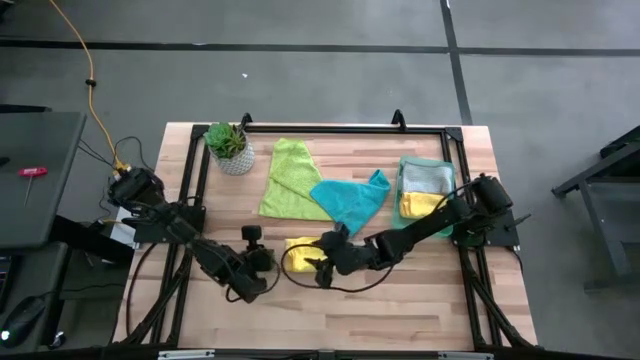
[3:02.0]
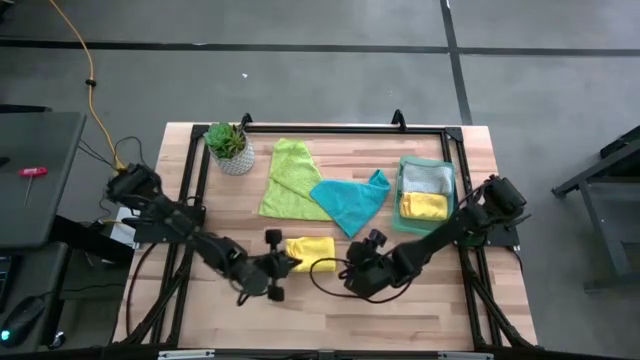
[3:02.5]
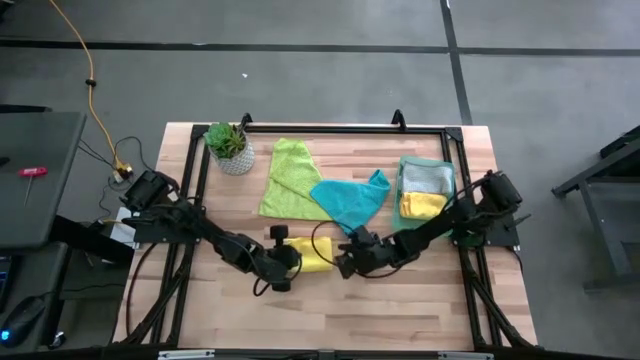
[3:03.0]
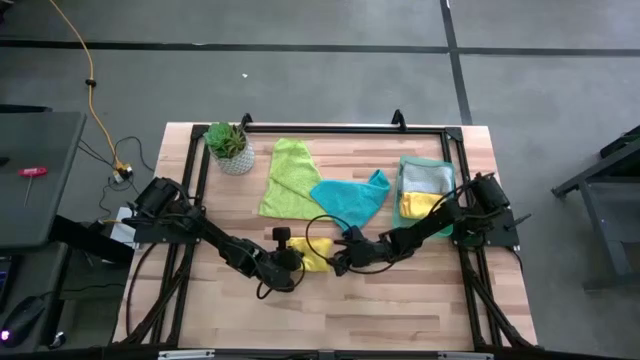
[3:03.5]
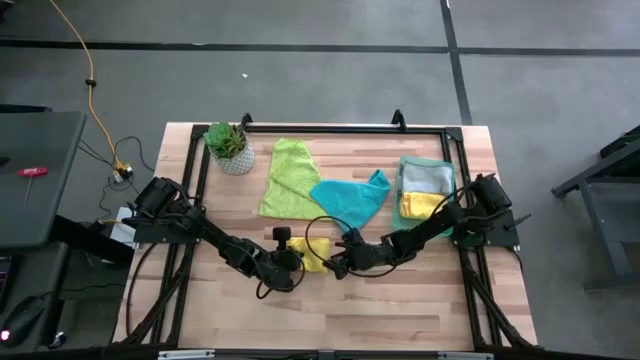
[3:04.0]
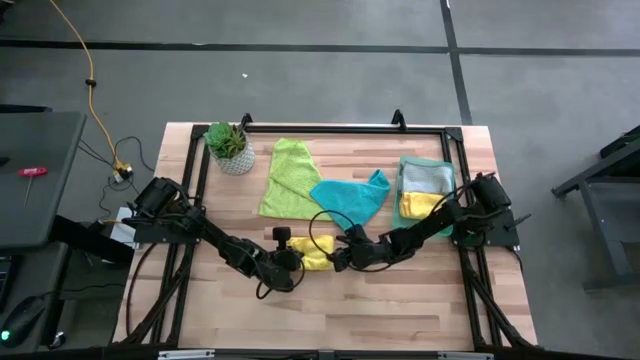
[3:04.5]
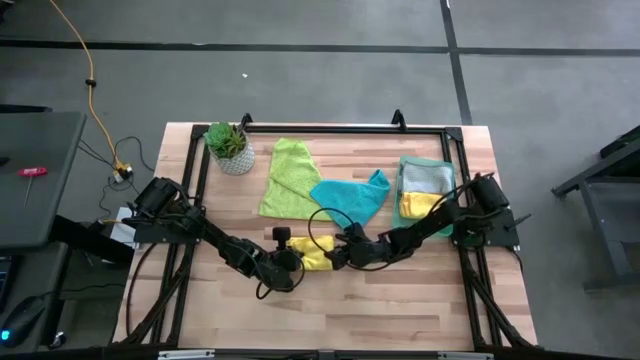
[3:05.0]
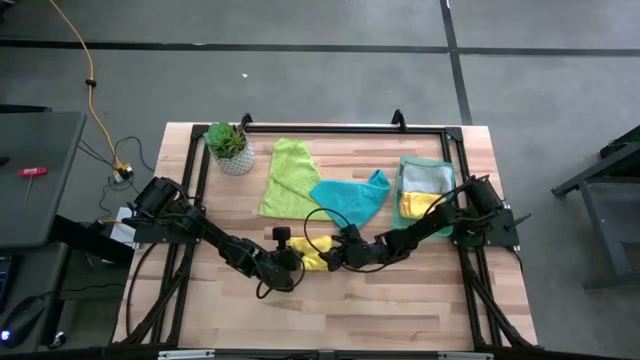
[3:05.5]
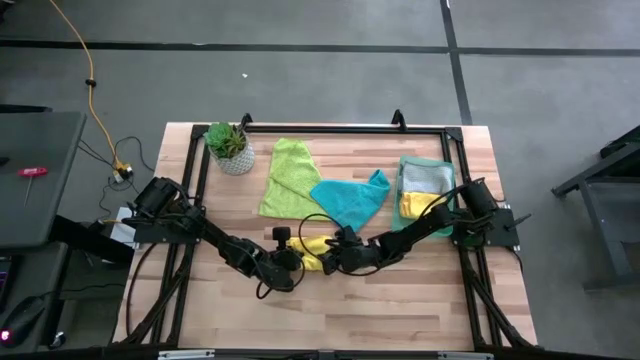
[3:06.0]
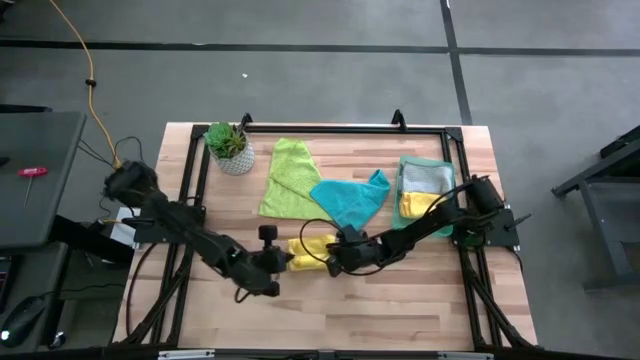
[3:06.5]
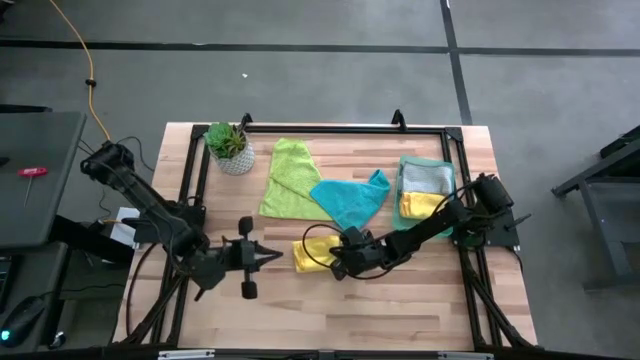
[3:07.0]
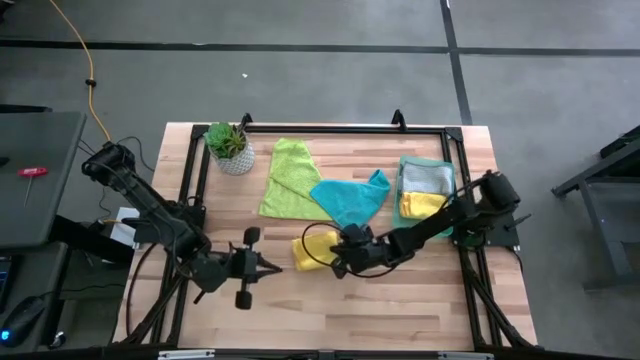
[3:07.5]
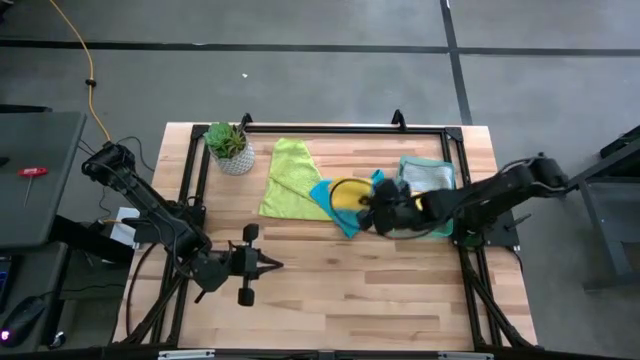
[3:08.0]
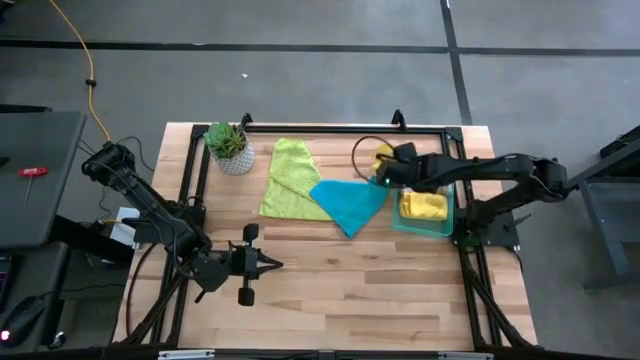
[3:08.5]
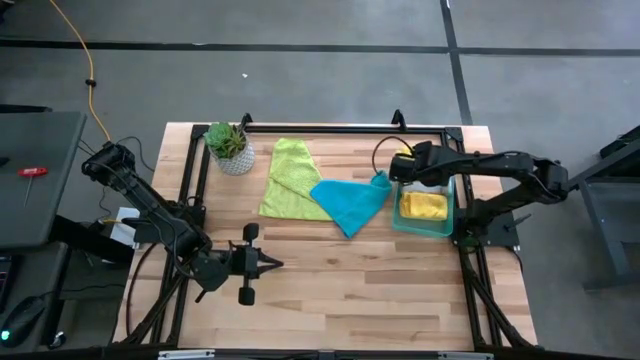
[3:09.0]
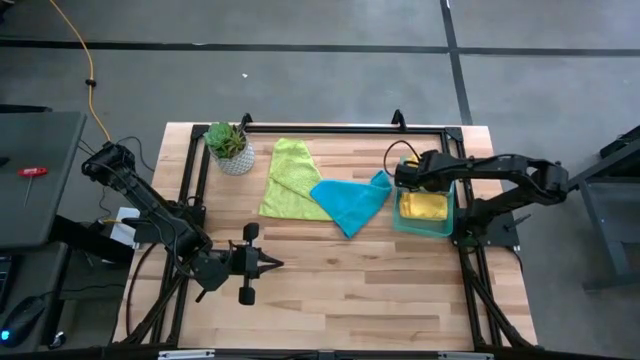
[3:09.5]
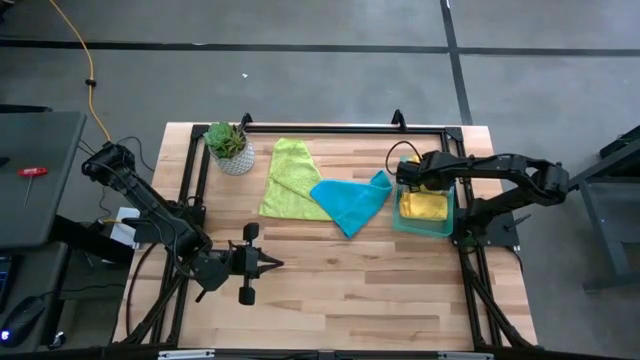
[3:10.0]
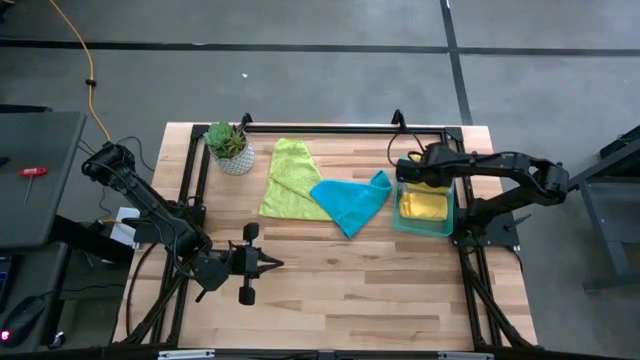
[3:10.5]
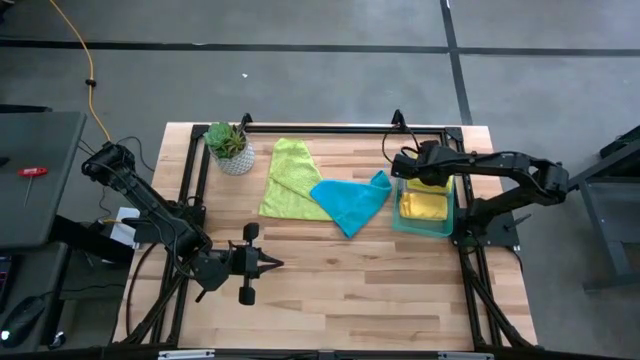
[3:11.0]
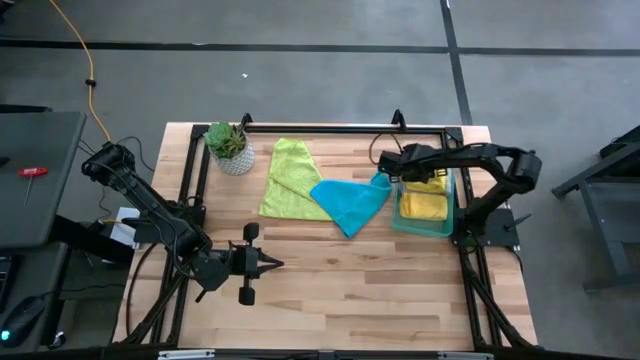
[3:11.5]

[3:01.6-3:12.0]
Task: Fold microfiber towels
Put the yellow microfiber cloth into the blue bin

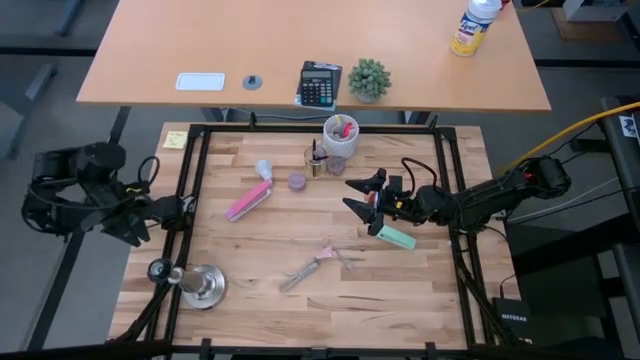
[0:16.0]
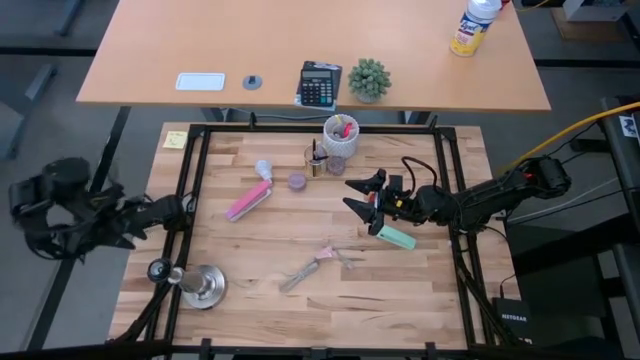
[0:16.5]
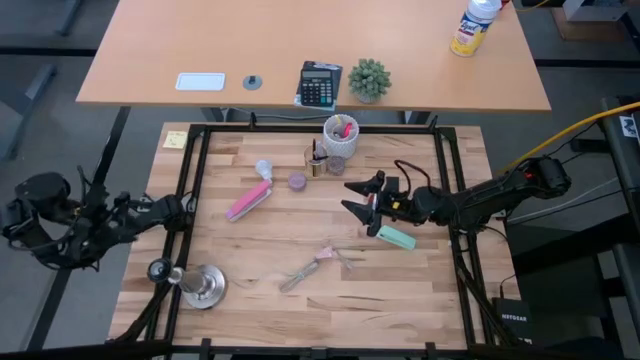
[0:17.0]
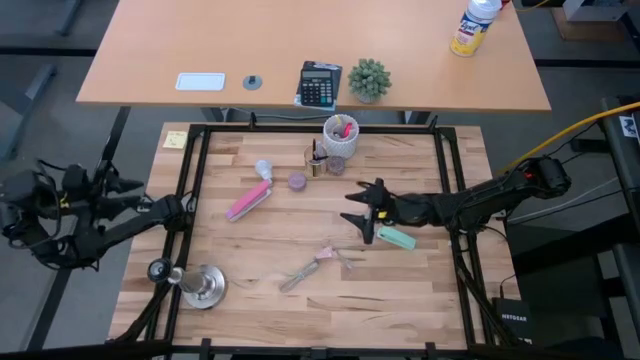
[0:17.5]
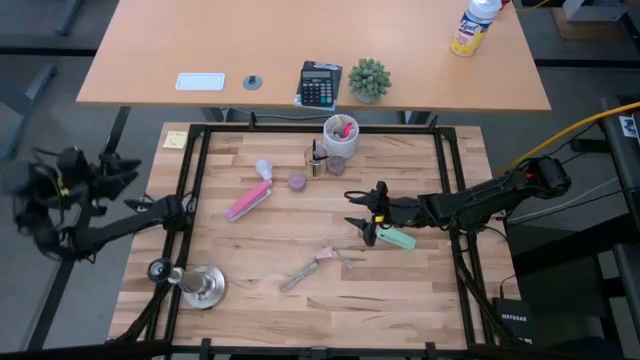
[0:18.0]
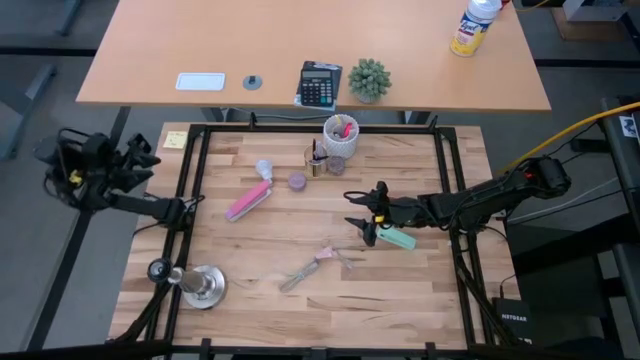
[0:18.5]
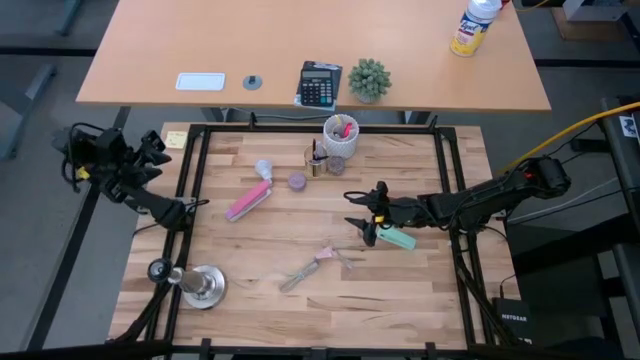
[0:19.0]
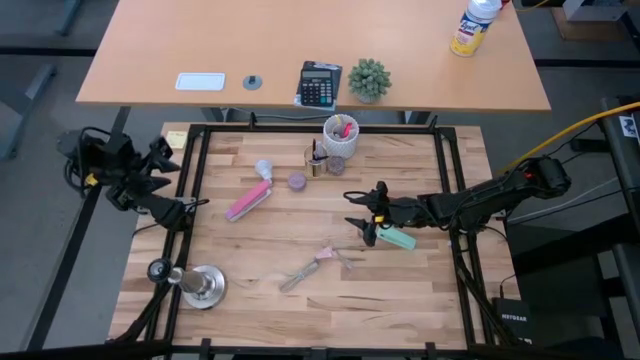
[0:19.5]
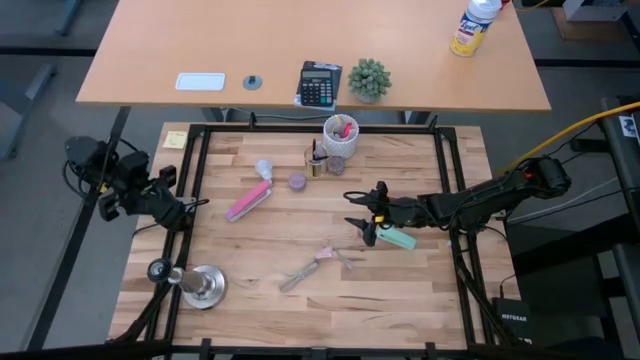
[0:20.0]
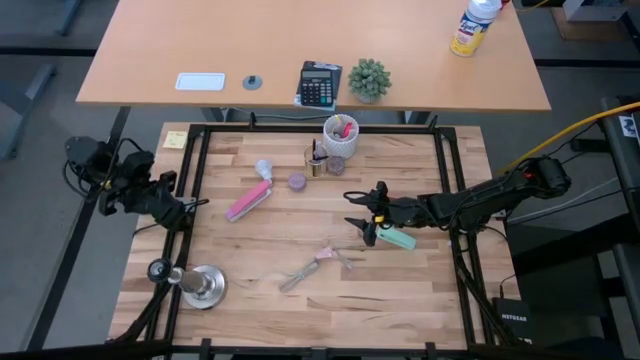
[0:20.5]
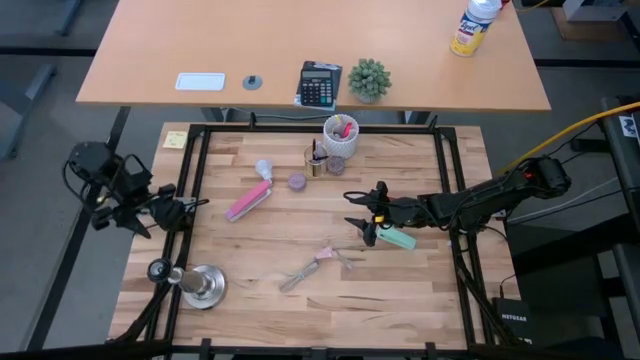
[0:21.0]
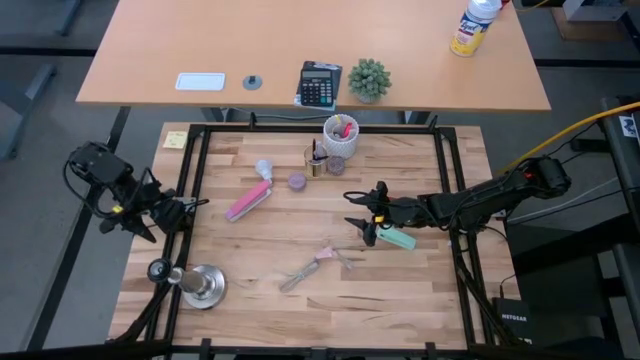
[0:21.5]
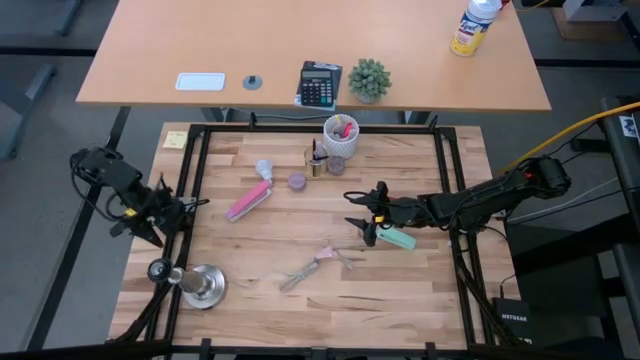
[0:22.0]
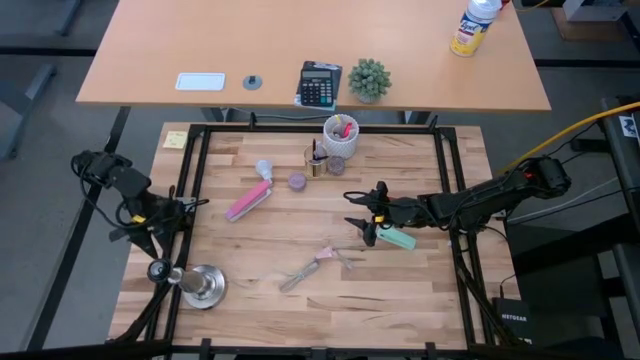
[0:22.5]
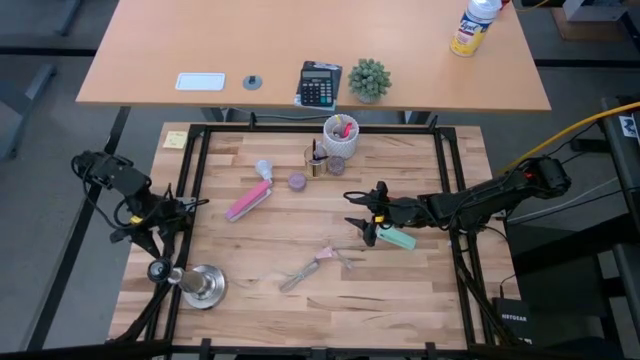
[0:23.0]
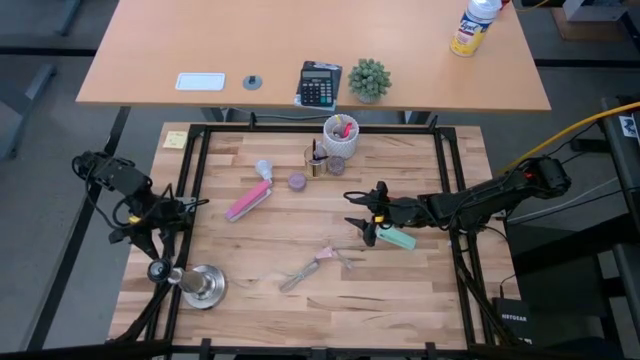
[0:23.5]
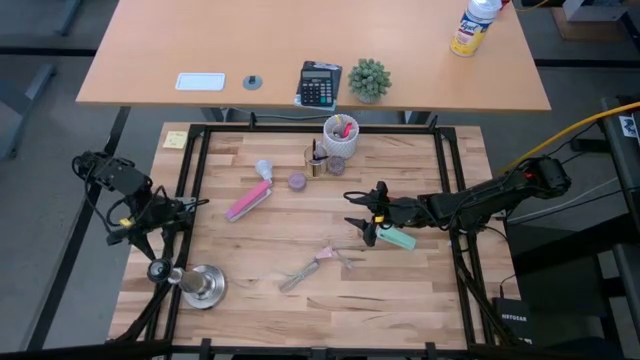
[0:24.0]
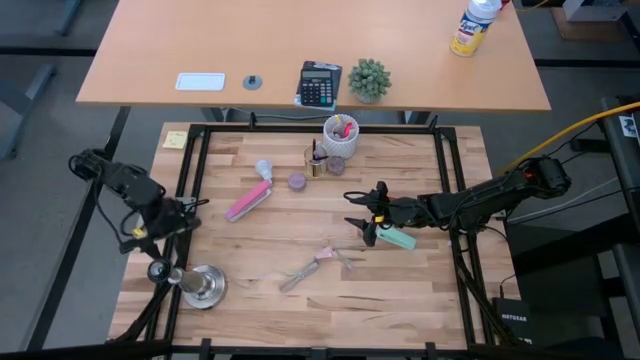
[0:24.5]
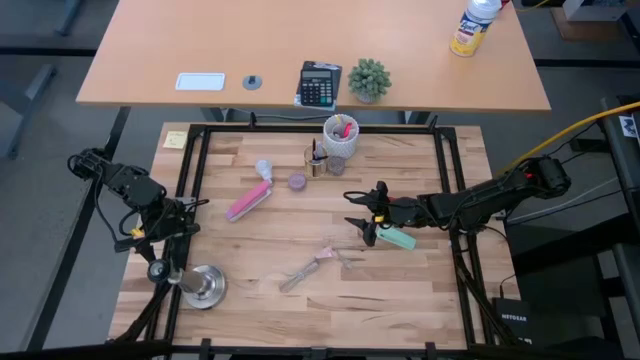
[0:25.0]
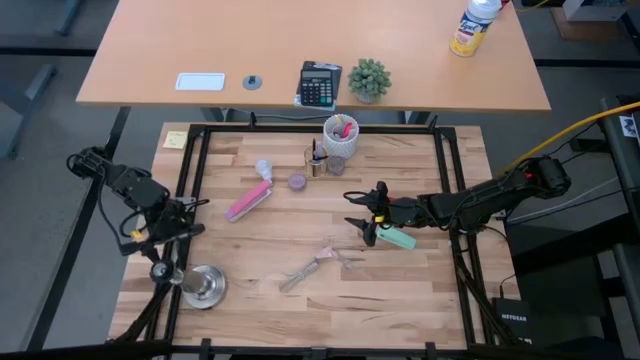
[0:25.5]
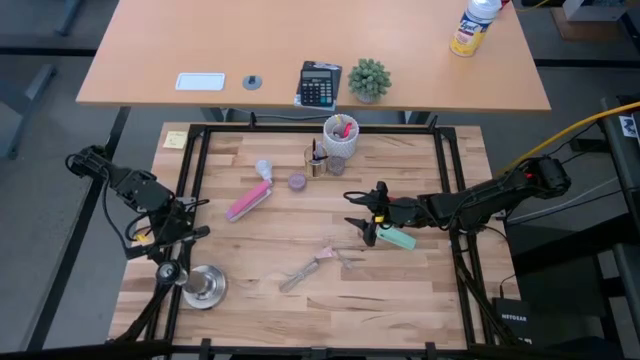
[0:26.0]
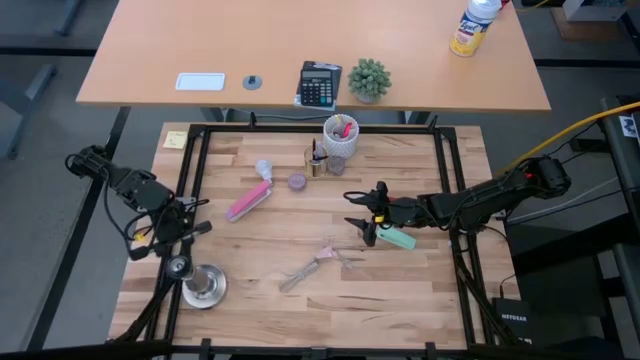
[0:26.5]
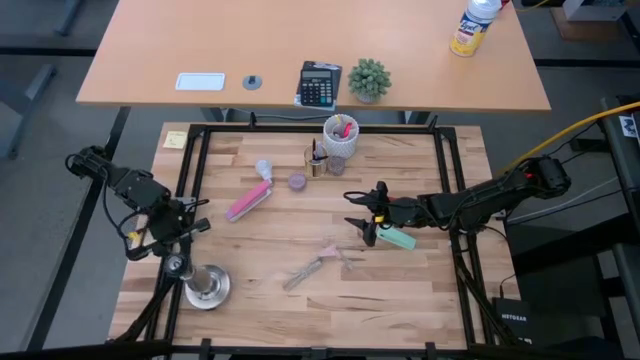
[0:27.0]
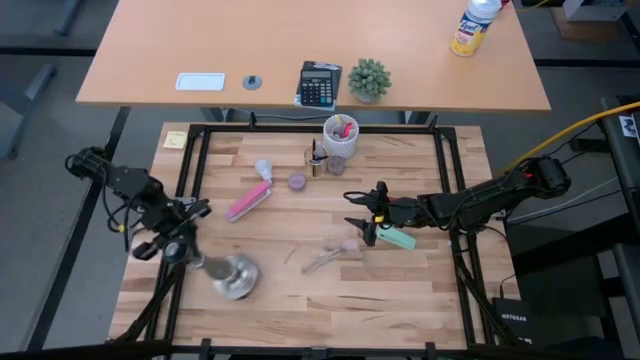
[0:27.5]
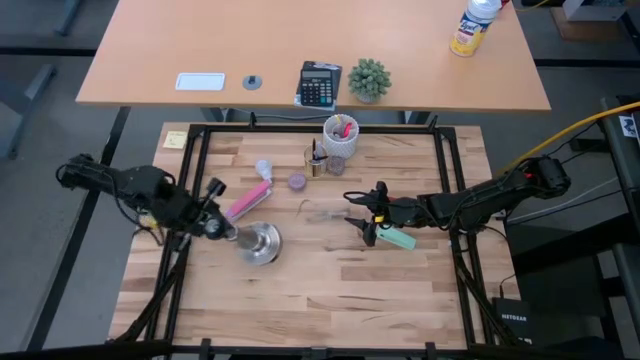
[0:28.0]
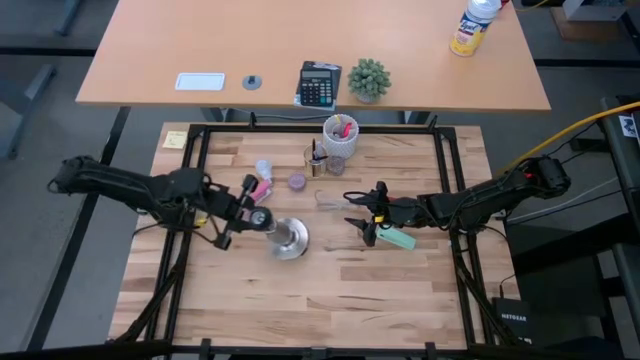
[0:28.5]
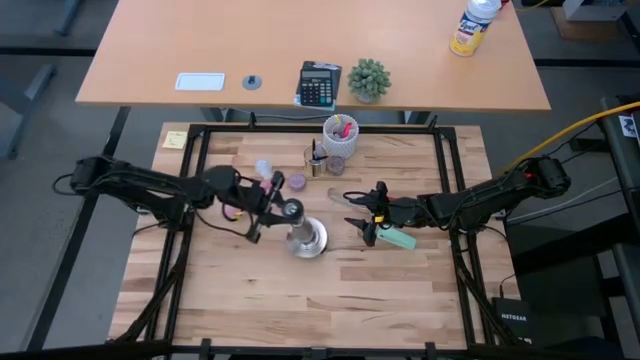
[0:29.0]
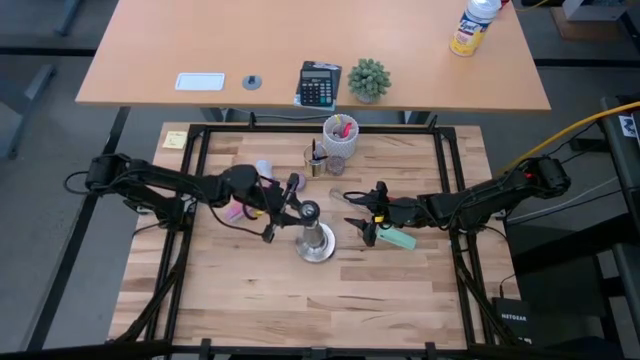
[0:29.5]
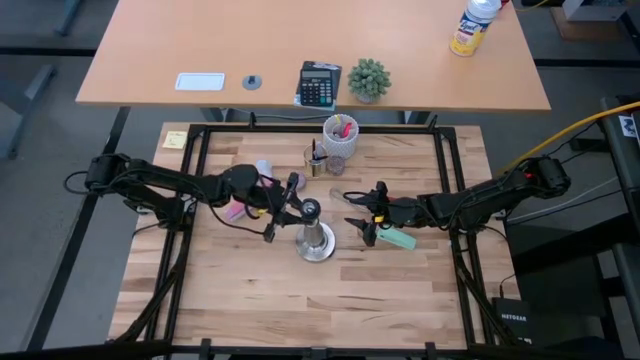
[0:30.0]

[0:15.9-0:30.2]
Task: Screw lightbulb
Move the lamp socket to the center of the table
